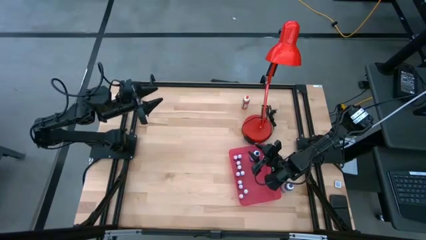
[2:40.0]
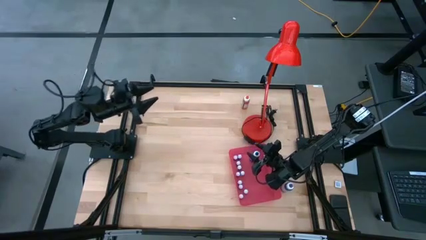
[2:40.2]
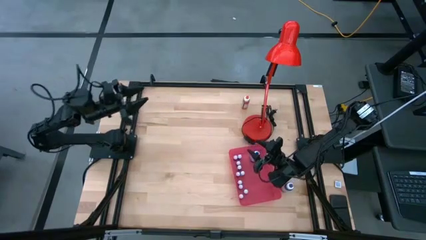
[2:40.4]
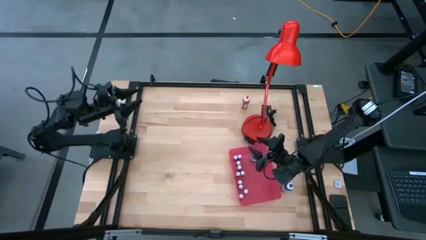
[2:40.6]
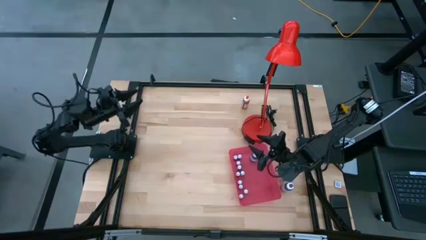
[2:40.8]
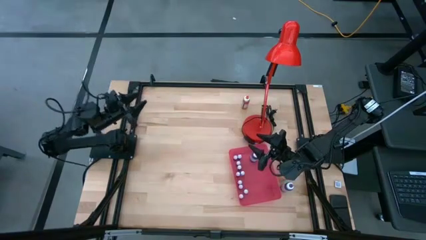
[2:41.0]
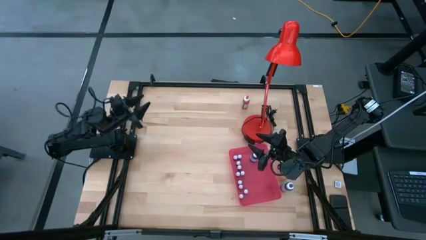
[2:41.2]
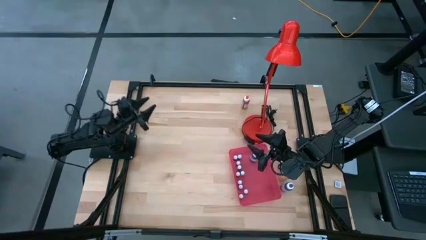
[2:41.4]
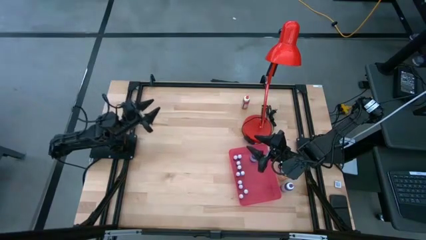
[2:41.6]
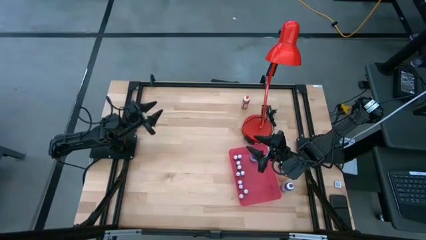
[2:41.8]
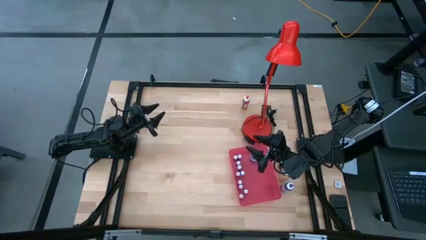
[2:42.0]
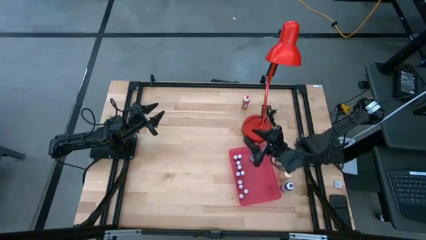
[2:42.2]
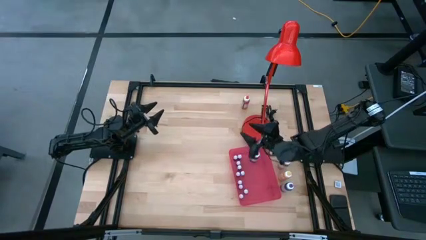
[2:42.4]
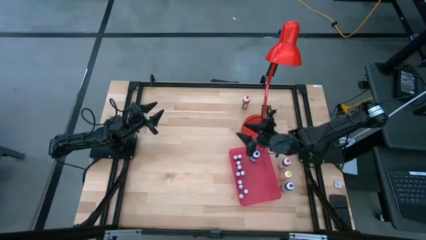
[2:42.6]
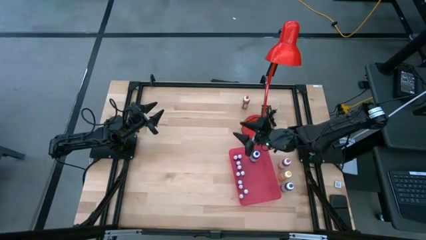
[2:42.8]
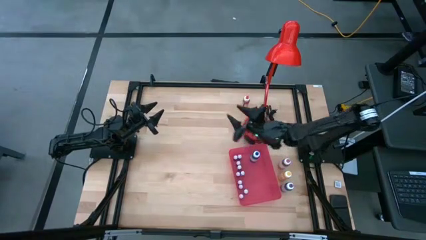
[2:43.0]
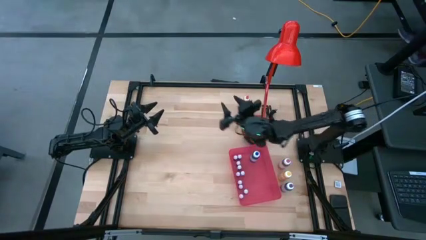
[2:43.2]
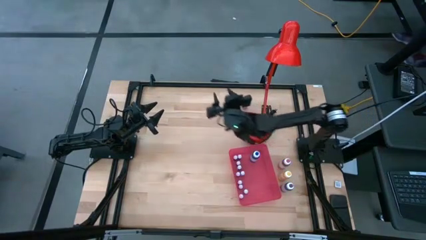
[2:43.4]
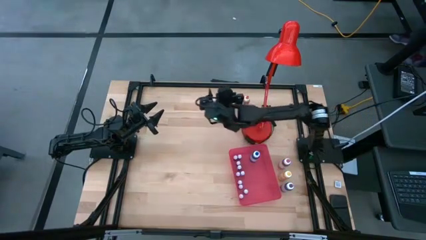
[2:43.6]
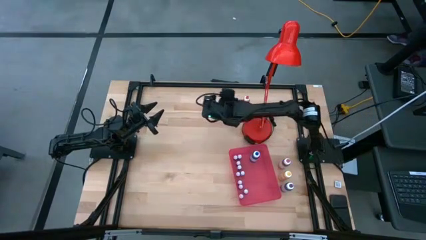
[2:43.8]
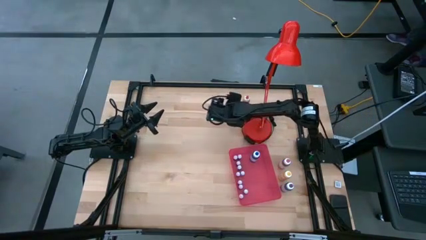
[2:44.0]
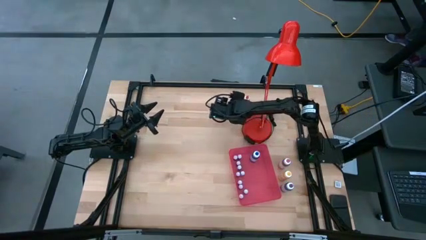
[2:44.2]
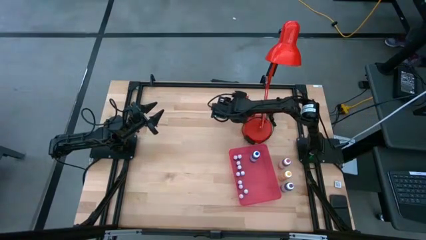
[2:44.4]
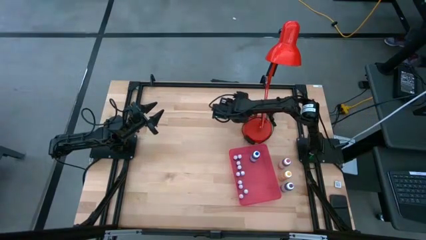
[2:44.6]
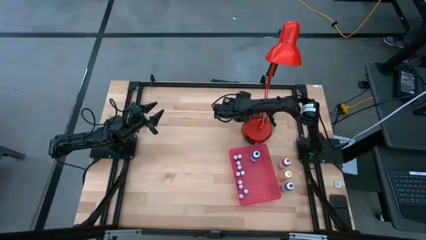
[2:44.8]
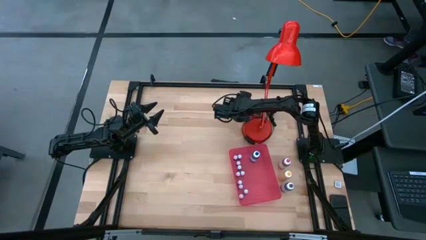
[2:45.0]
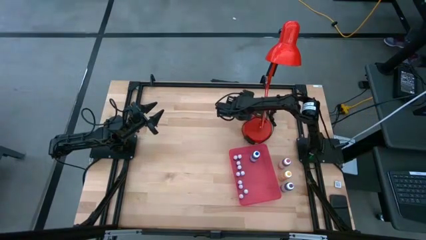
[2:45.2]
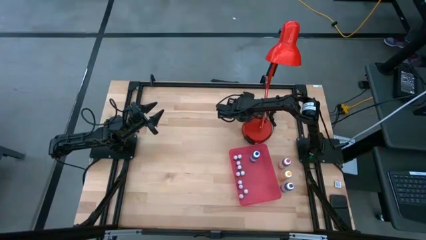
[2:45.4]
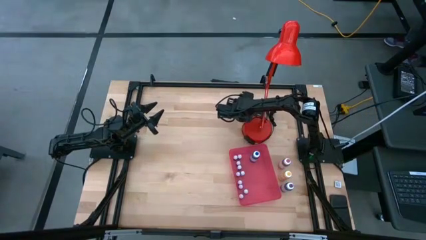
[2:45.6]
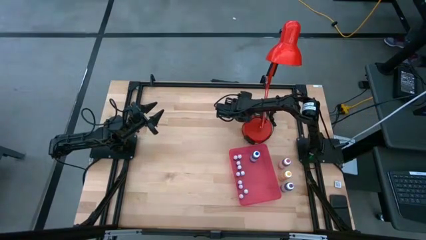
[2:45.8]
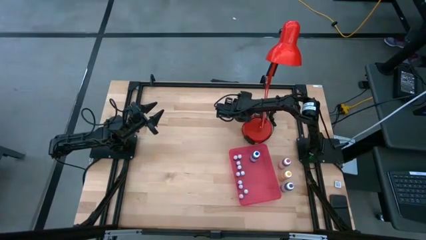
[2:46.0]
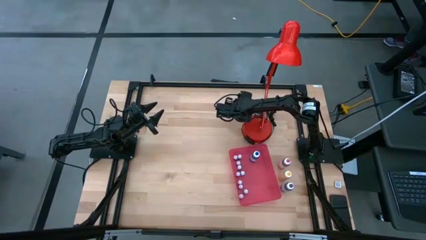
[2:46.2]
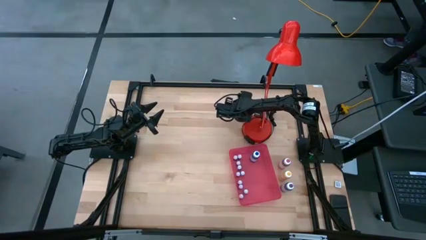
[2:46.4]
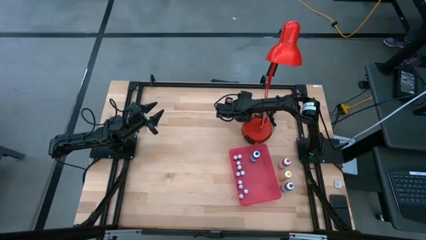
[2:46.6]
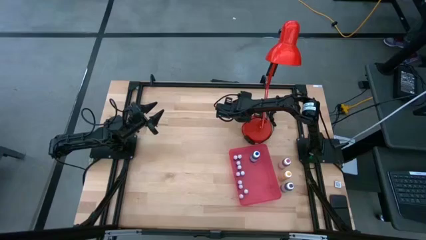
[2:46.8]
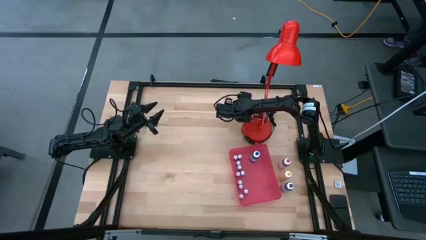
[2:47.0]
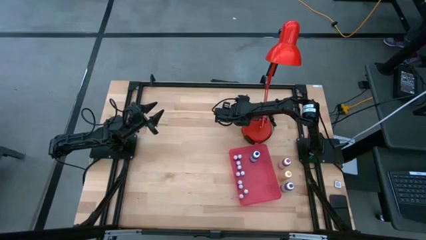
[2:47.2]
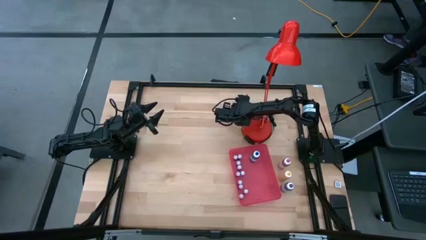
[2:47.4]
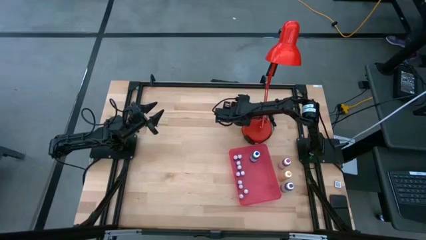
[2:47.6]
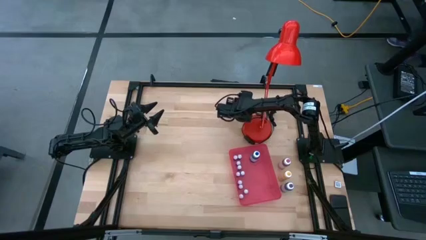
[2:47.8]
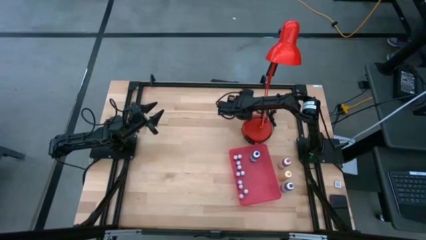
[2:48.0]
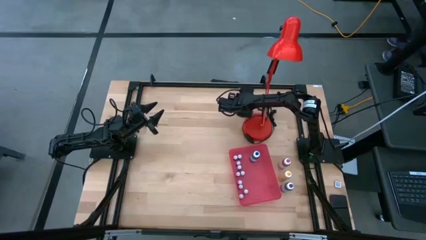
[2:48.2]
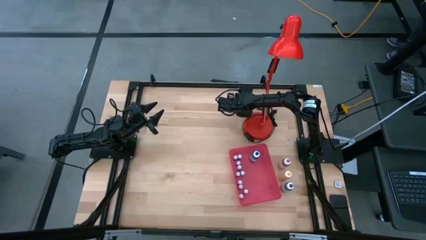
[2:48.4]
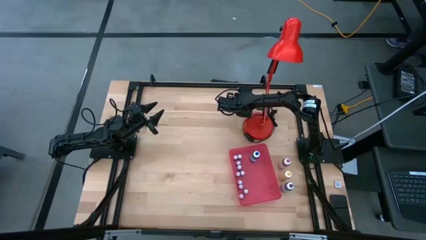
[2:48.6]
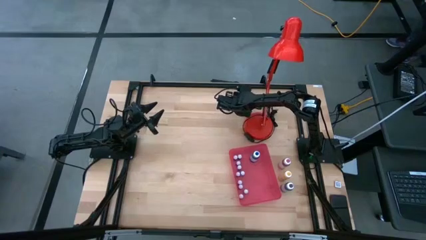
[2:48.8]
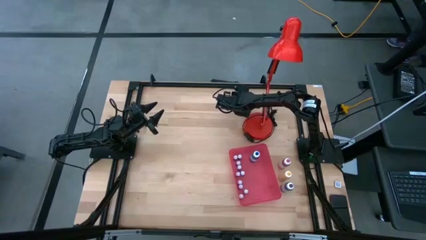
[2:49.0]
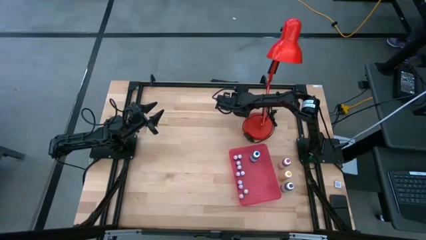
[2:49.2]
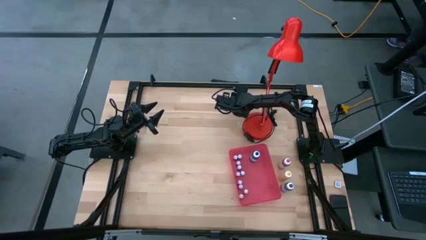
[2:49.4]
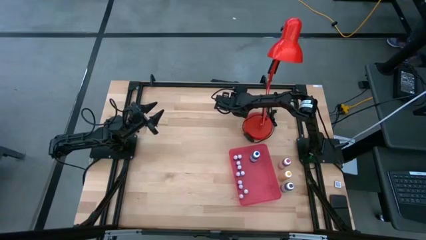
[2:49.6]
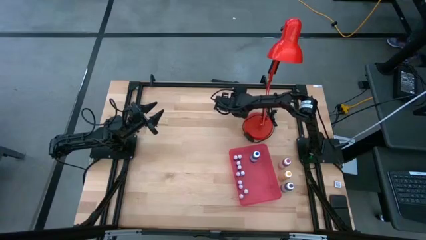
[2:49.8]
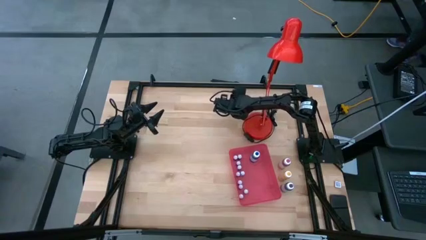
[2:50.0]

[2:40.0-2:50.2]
Task: Pick & Place food coloring
Put the large orange food coloring bottle into the red bin

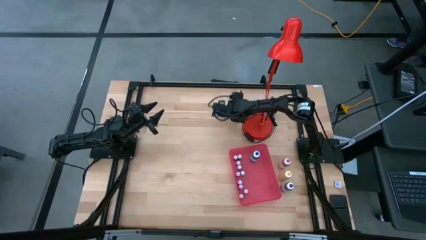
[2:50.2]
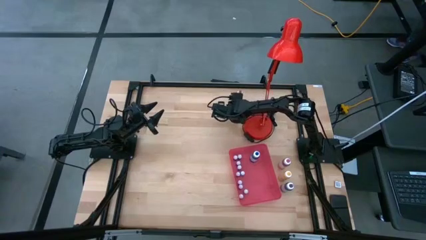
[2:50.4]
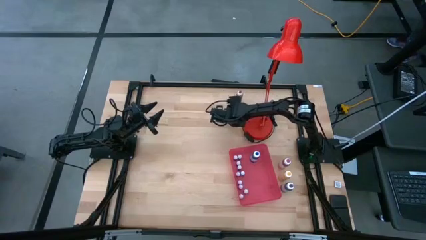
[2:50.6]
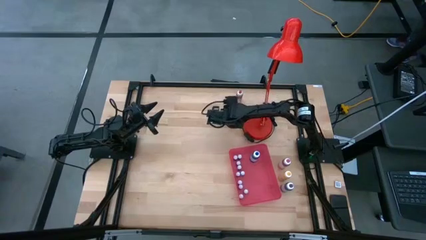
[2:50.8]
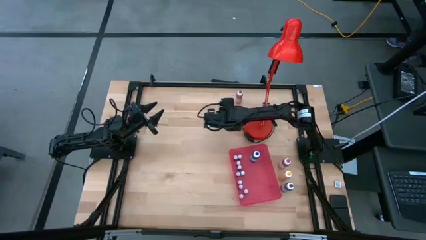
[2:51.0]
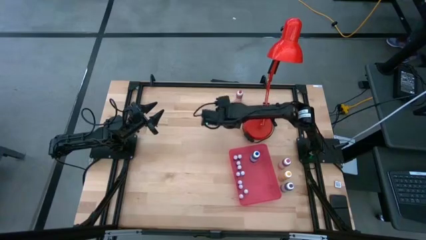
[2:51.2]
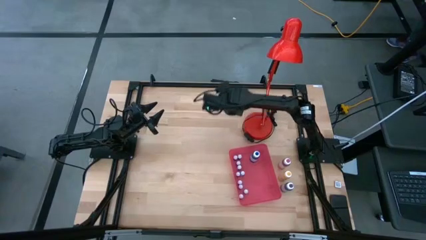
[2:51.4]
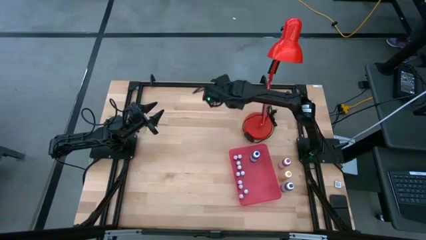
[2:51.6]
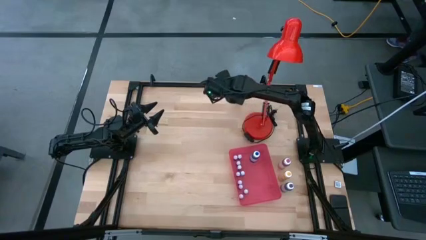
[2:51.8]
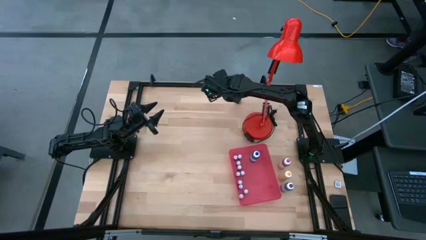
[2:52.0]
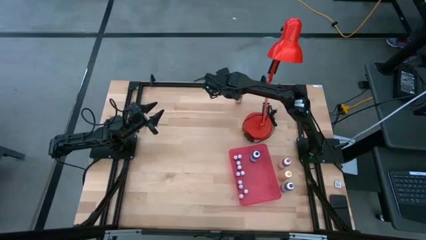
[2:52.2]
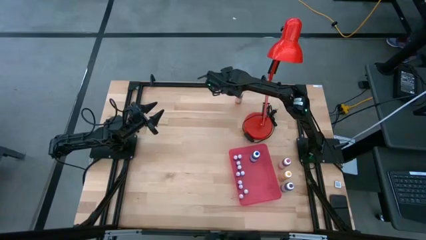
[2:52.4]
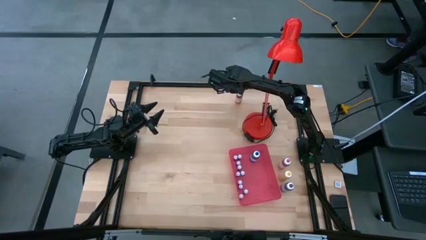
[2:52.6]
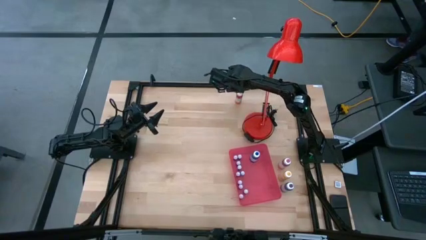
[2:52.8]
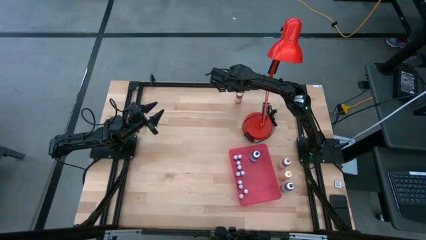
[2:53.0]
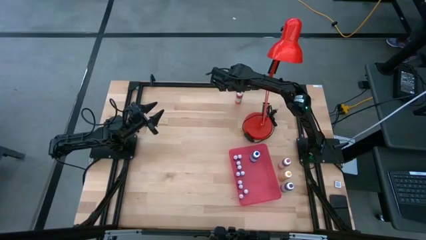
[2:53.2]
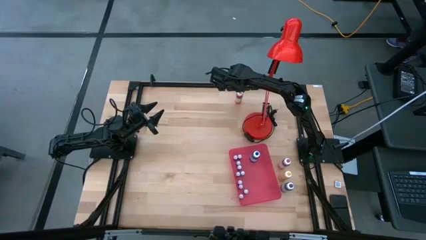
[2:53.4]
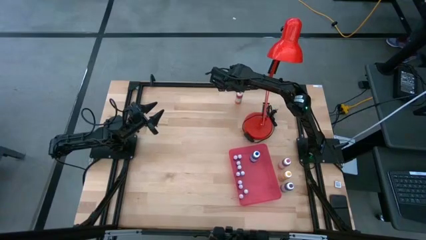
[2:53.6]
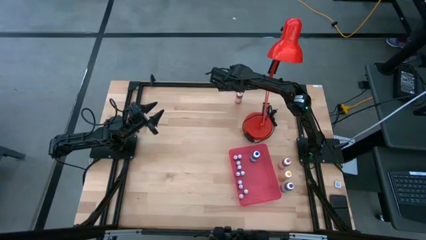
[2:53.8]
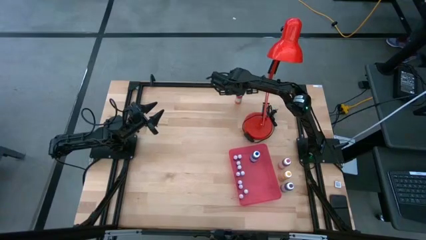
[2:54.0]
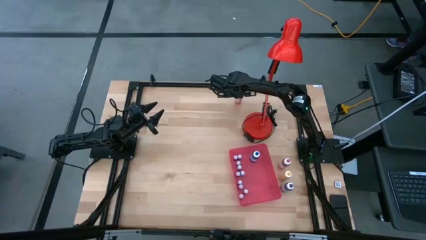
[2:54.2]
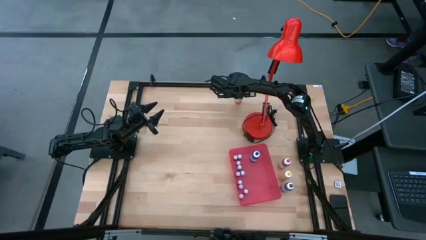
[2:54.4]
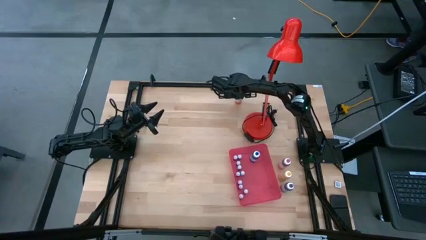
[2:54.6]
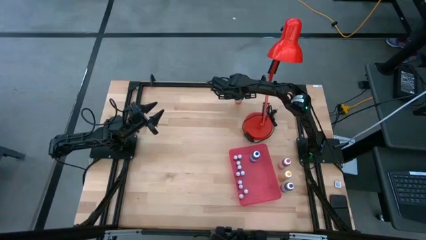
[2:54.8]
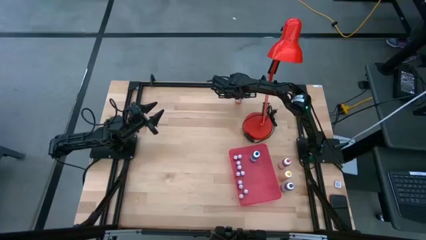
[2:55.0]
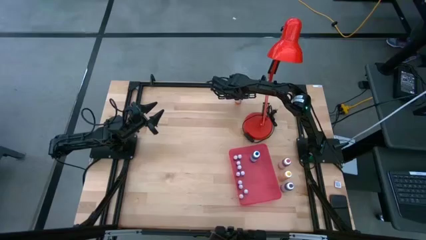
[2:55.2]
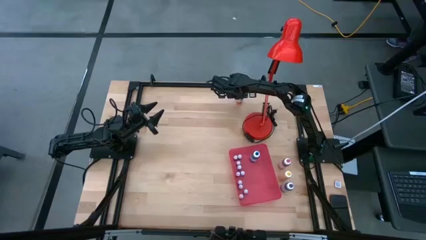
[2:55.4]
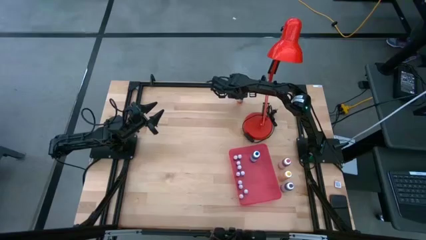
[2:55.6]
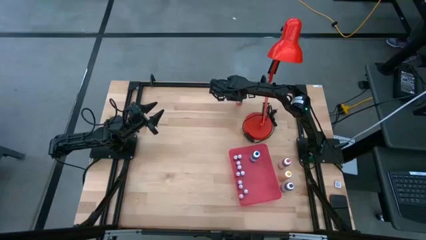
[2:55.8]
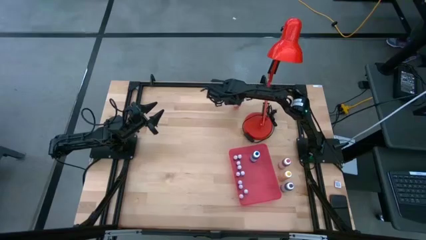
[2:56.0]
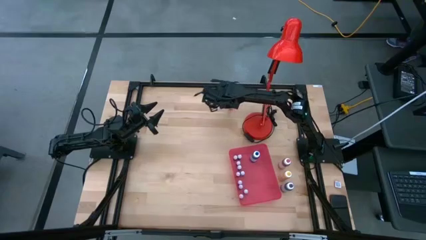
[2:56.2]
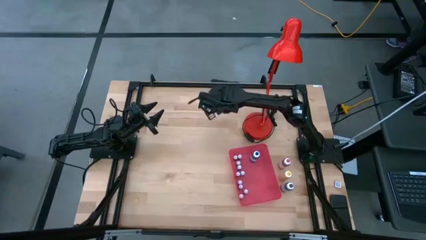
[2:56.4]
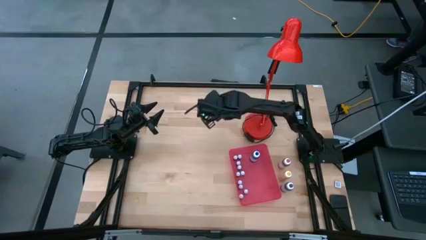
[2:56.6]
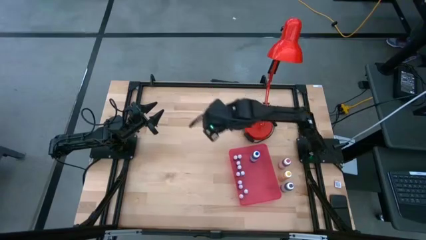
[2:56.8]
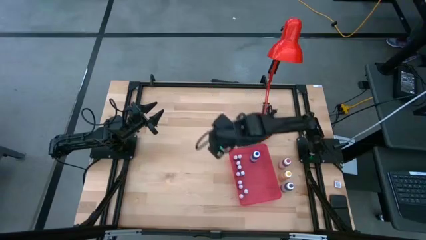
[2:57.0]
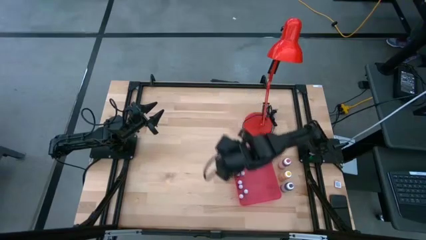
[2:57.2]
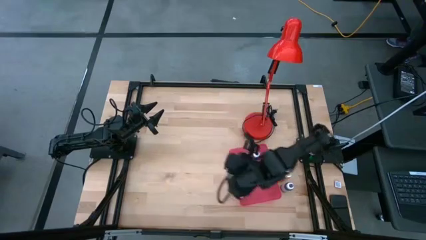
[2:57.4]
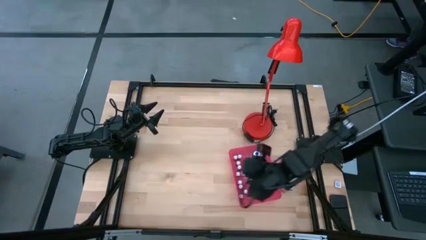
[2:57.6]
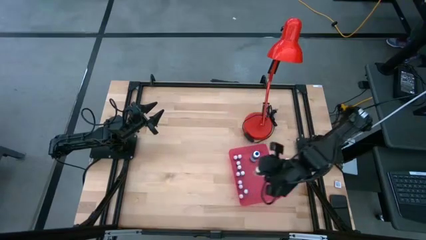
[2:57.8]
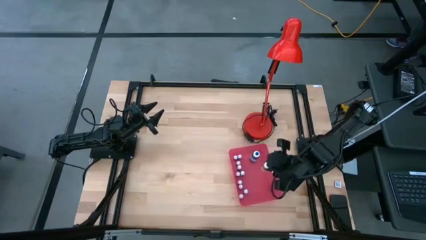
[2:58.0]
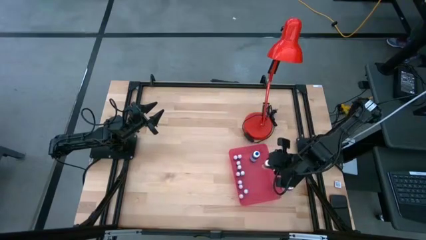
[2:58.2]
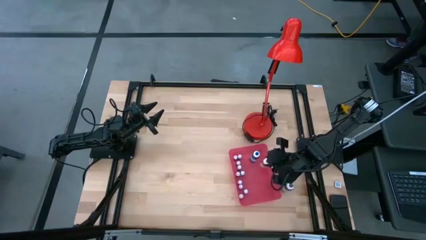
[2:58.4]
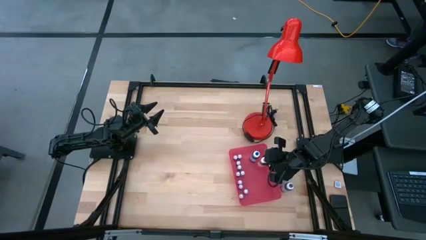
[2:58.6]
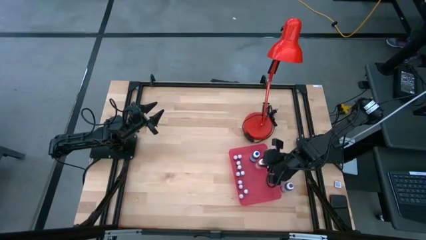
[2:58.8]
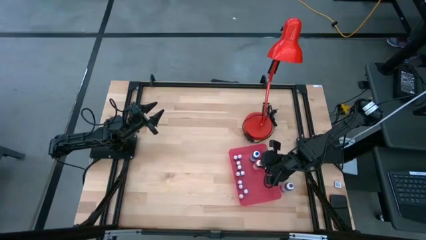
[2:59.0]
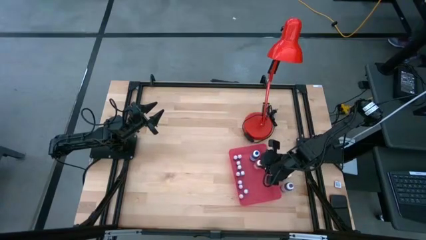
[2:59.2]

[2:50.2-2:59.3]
Put the large orange food coloring bottle into the red bin
